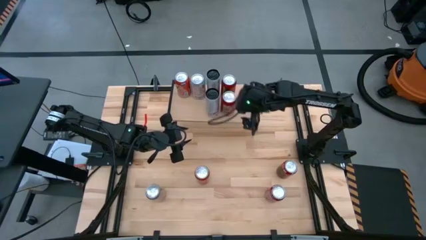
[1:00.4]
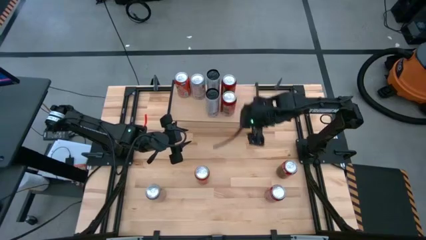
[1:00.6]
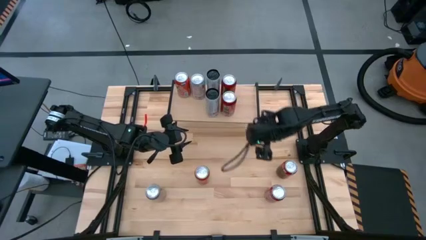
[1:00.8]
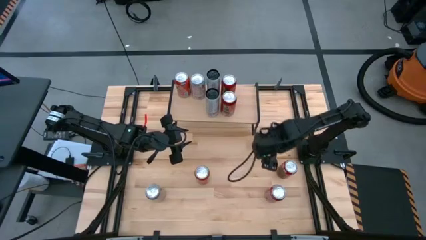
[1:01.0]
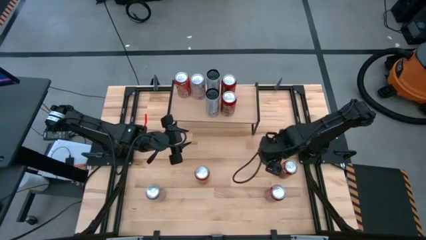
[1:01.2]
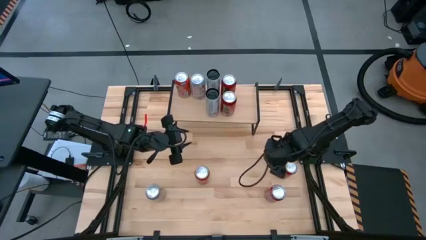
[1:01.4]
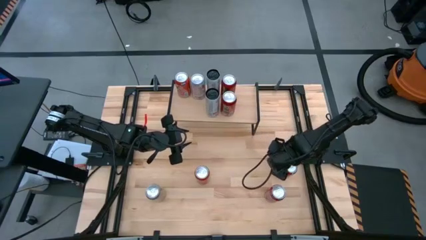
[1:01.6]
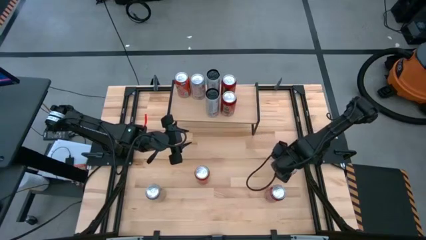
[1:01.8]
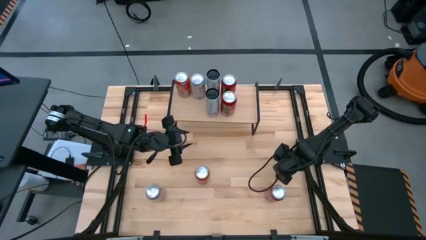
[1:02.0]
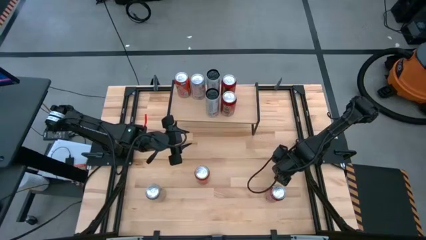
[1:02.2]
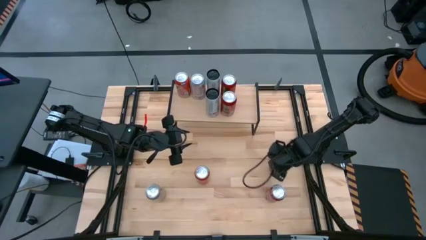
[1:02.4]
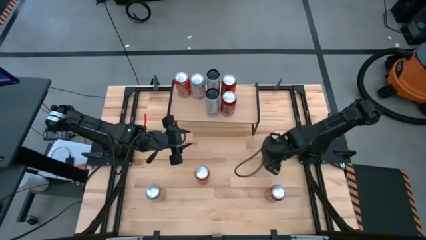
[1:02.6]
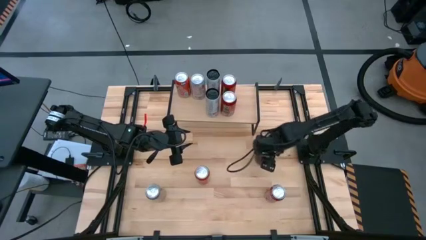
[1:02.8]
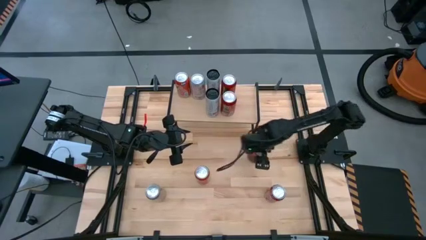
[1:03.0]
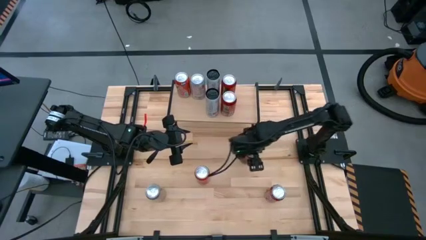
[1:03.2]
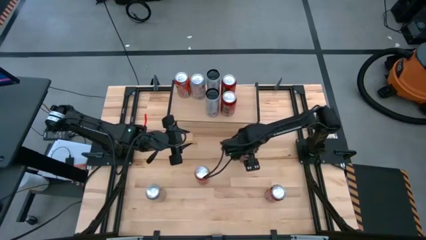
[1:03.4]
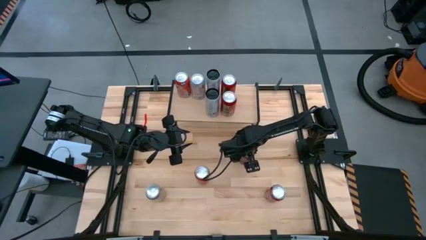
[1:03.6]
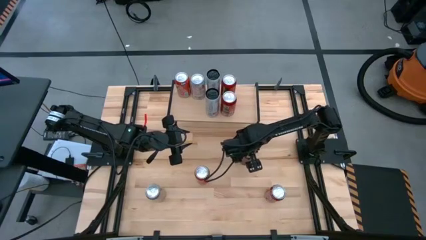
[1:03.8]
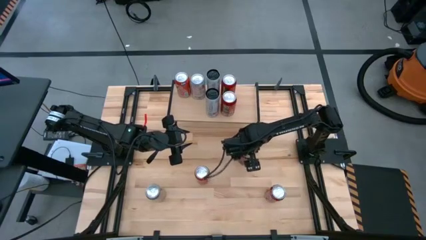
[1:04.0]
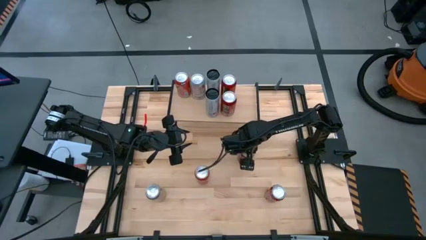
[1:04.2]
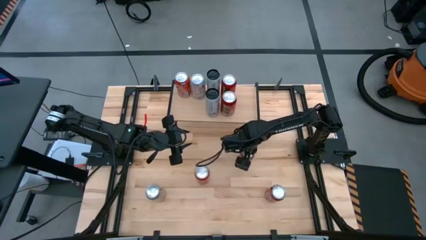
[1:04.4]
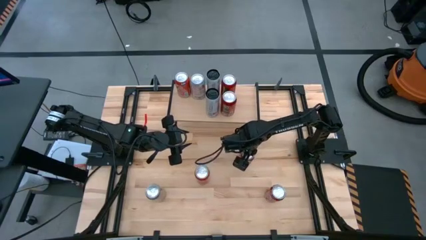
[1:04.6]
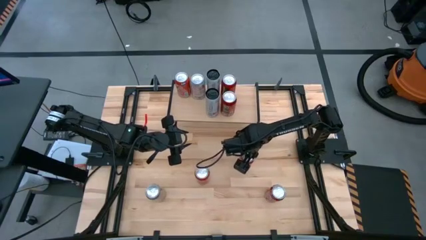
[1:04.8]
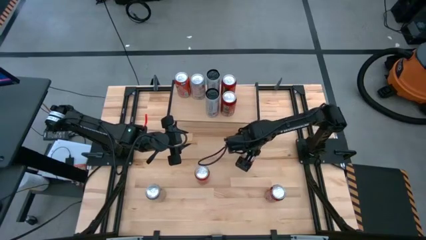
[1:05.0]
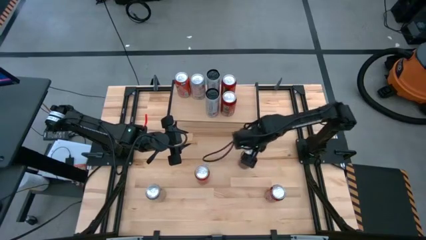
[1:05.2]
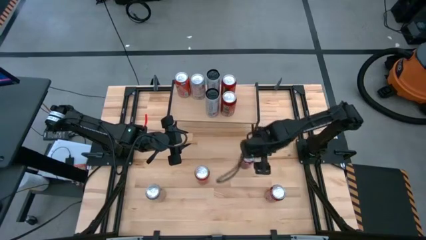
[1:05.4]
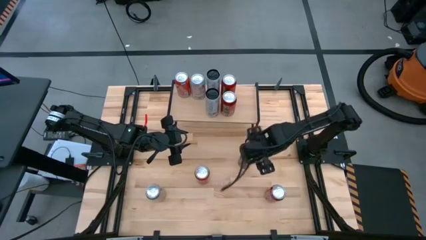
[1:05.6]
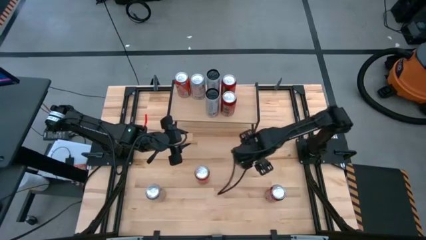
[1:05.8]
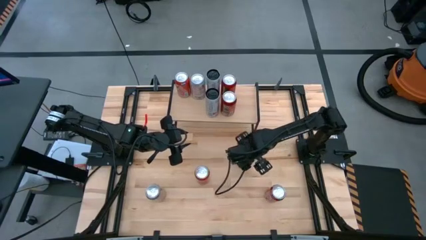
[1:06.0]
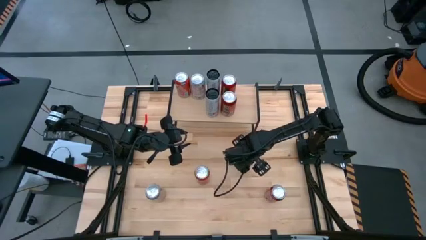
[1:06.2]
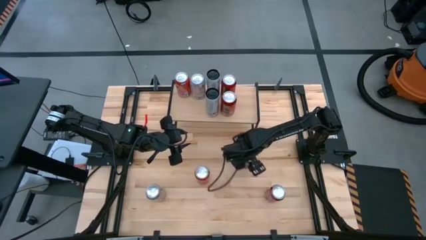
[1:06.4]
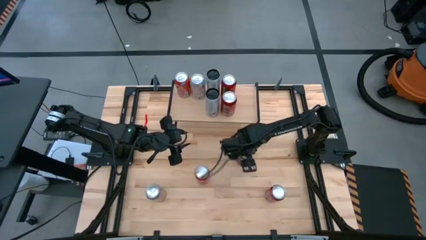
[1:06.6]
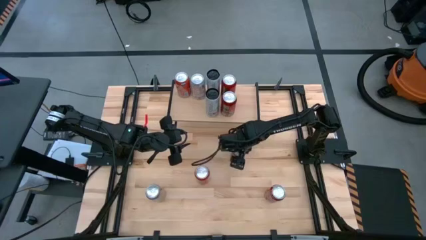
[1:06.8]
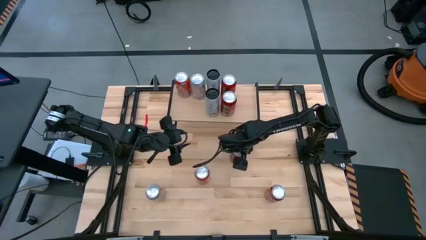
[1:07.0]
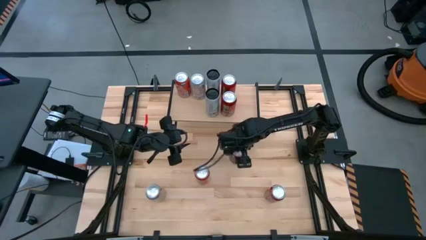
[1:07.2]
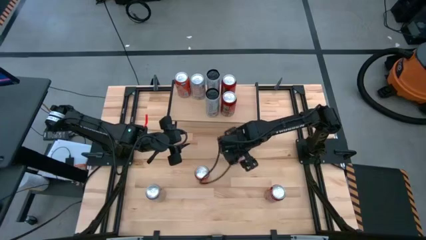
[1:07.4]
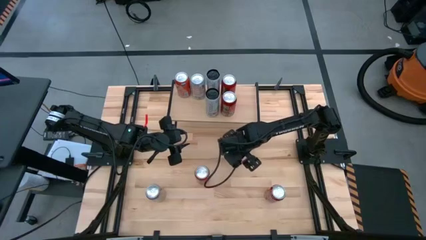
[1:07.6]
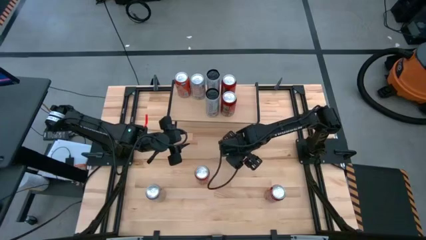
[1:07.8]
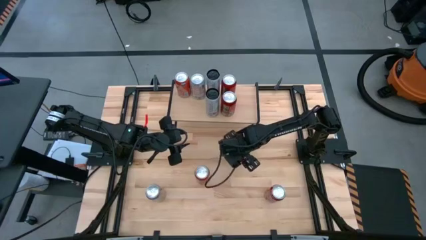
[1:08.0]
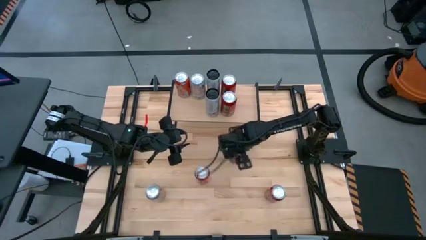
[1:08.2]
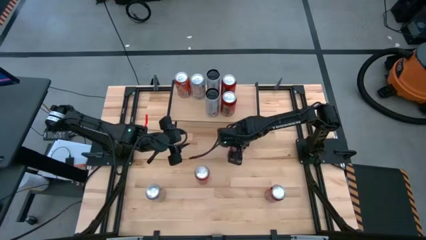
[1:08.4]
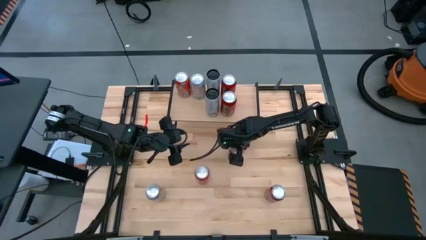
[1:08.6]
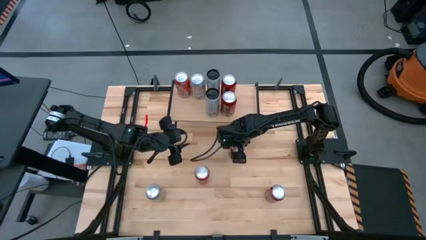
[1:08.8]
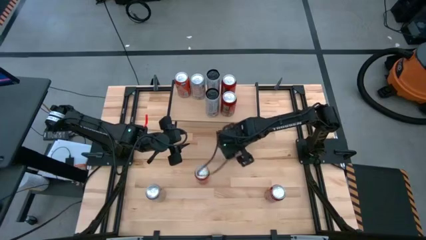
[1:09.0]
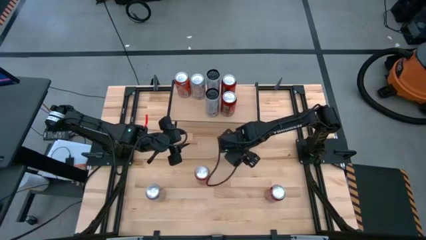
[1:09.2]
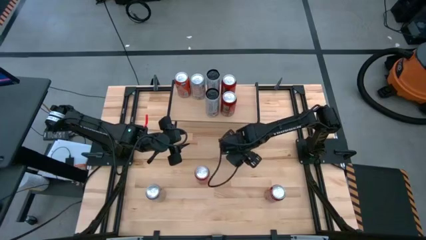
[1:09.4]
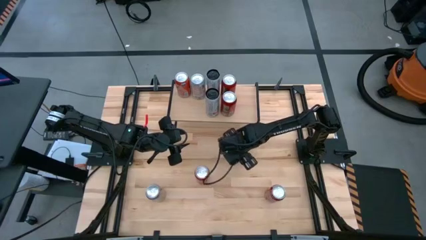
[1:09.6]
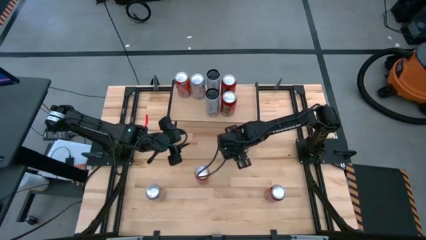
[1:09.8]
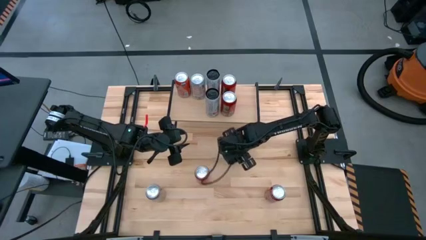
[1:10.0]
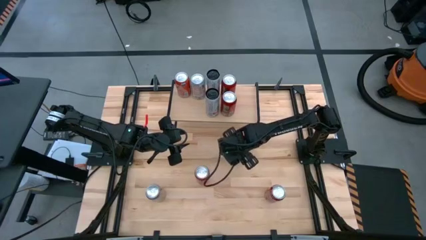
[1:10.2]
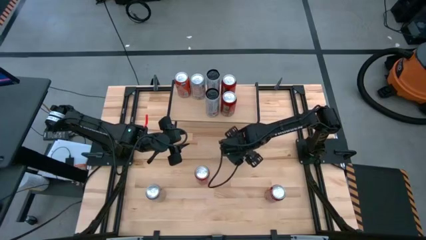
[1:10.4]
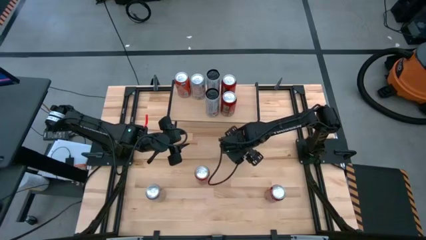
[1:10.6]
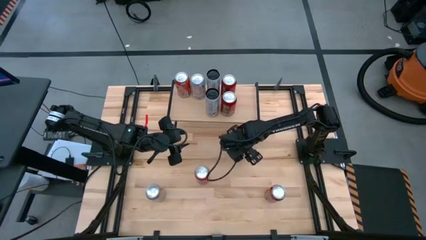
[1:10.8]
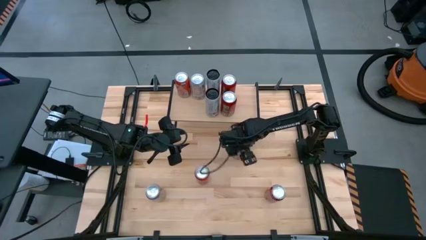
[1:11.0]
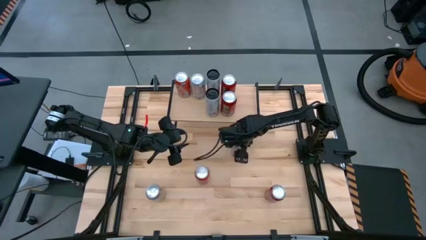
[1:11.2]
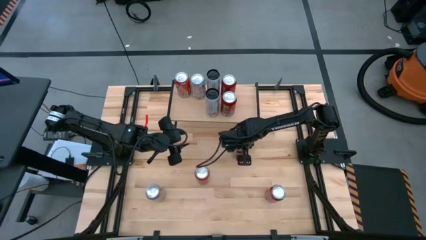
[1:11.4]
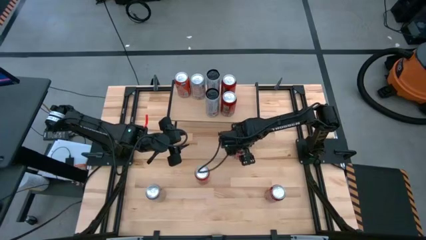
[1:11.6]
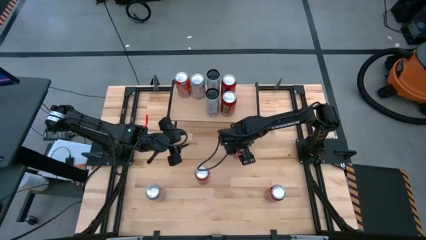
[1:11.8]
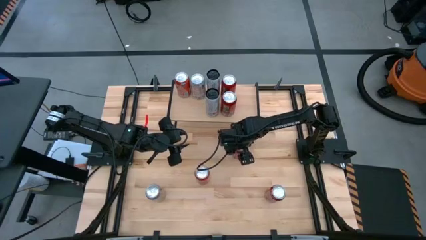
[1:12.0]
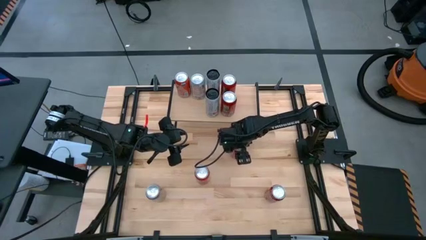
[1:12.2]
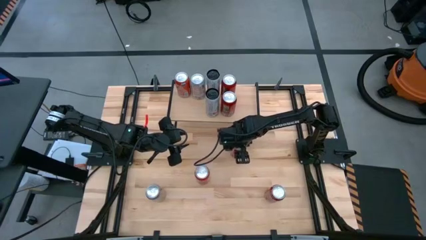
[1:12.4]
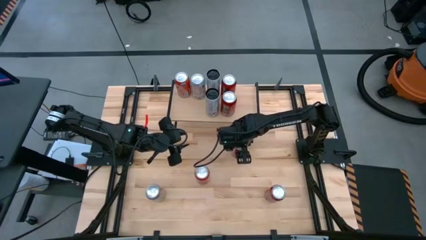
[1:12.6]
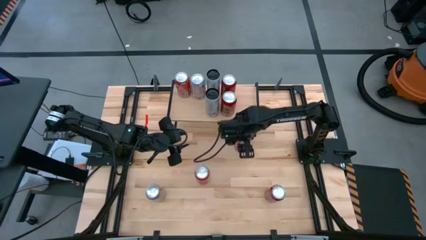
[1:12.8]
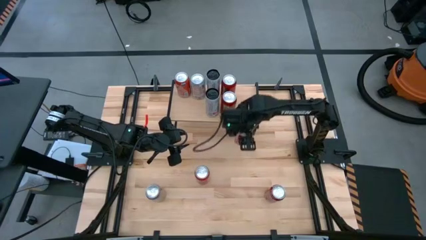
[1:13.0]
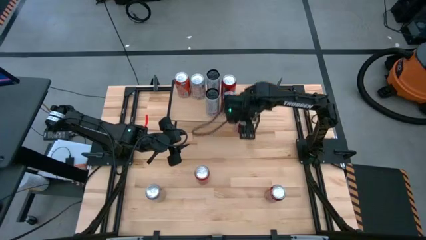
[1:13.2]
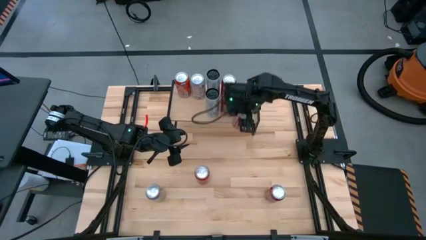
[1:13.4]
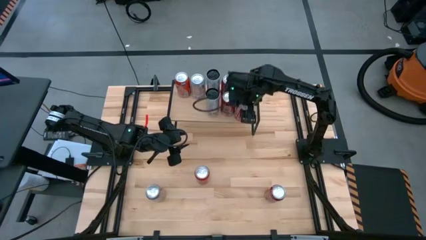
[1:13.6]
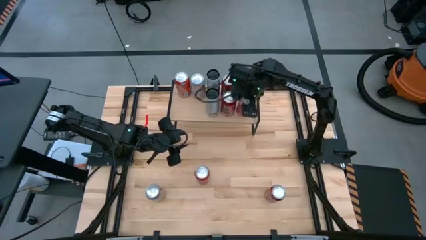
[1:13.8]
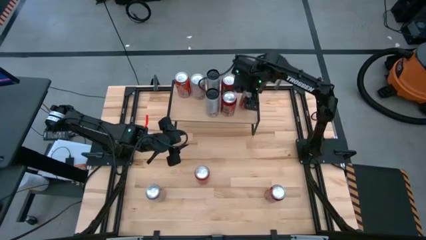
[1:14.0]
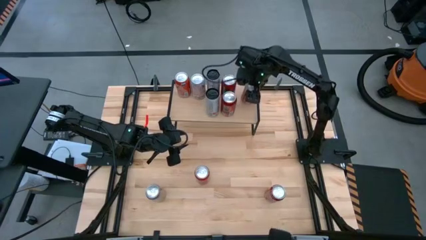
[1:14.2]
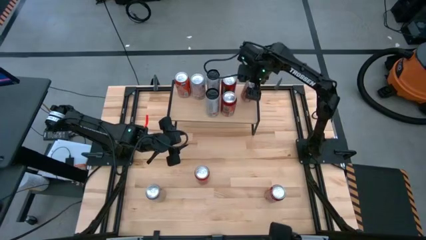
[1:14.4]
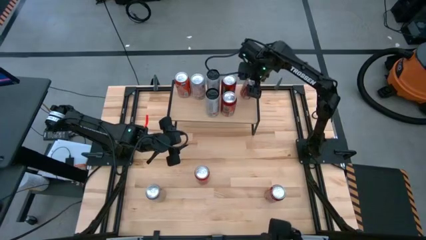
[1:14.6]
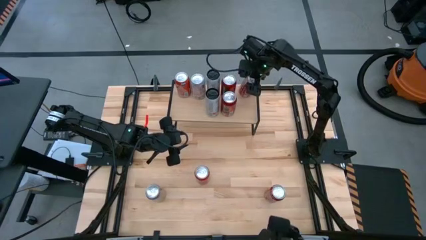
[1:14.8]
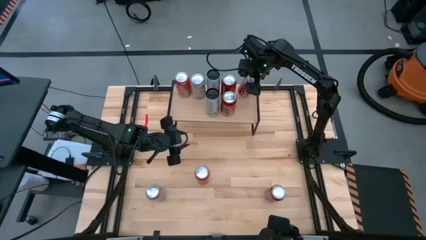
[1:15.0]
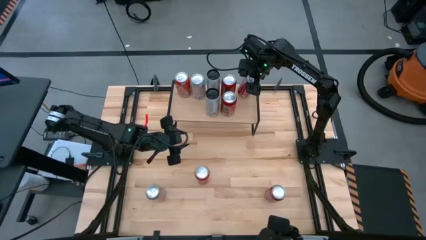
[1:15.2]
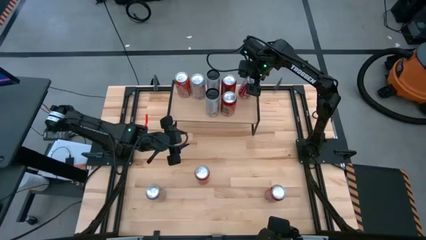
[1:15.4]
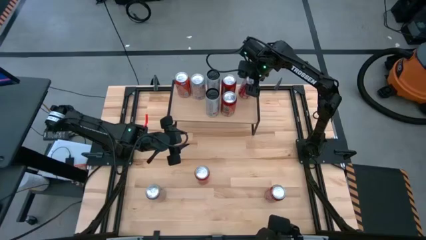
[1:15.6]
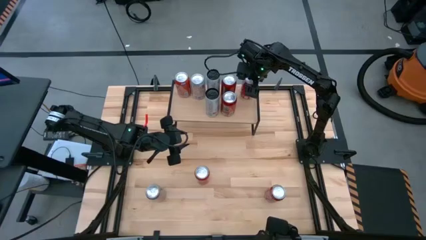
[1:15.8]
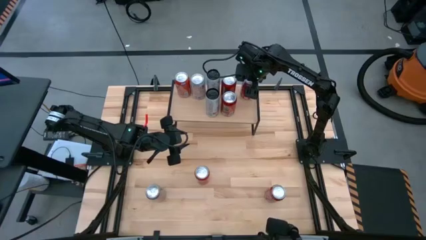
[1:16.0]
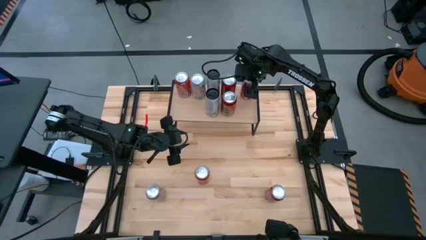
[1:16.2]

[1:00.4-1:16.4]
Task: Place canned beverage on shelf
Put the top red and white soda can on the shelf
